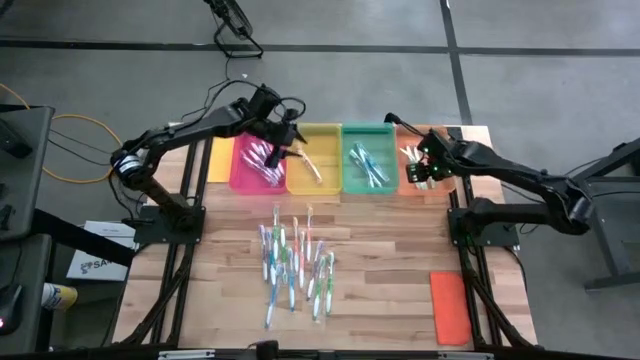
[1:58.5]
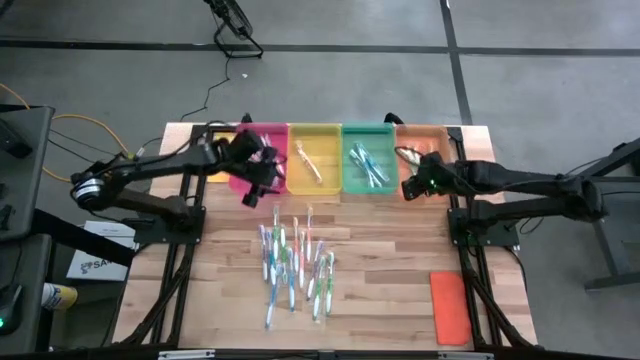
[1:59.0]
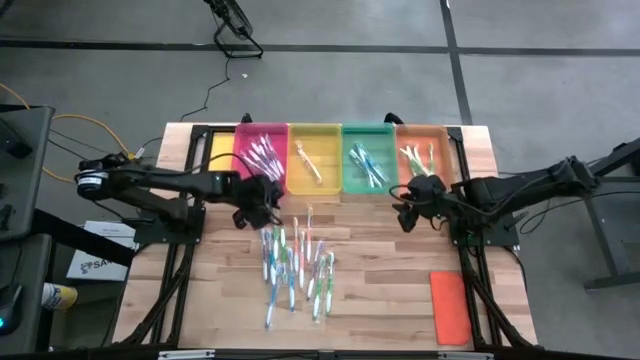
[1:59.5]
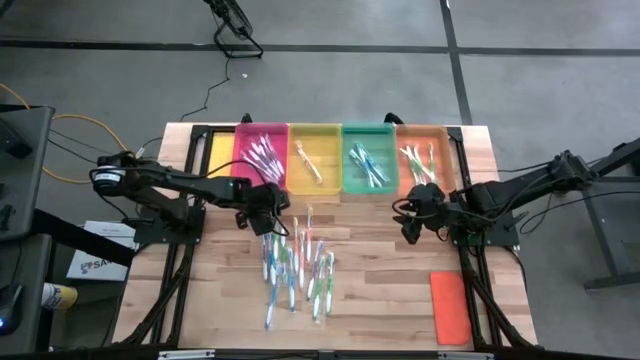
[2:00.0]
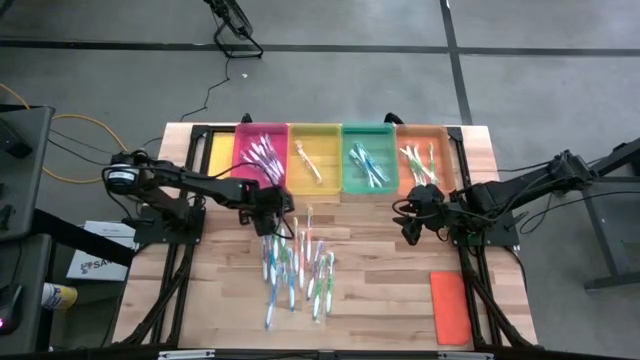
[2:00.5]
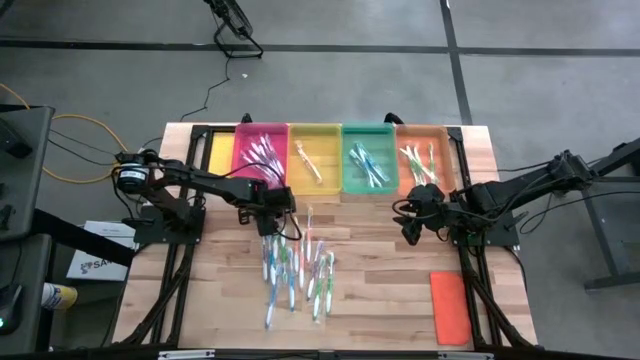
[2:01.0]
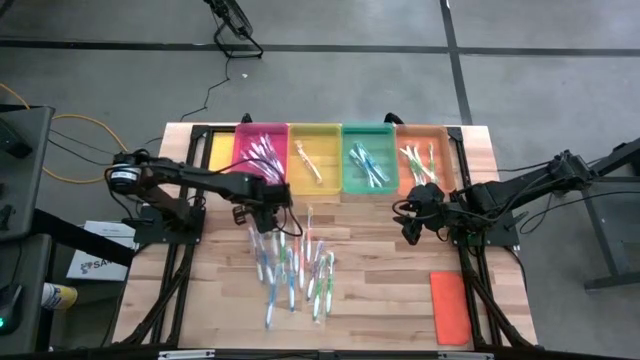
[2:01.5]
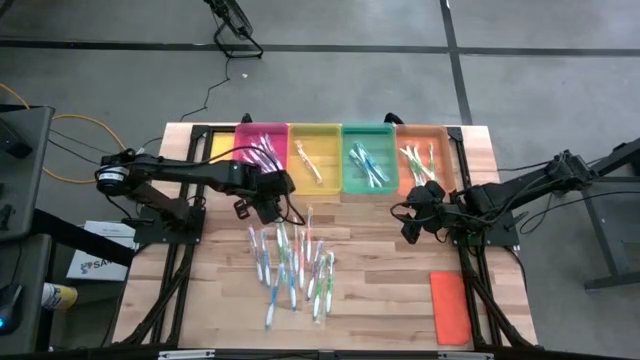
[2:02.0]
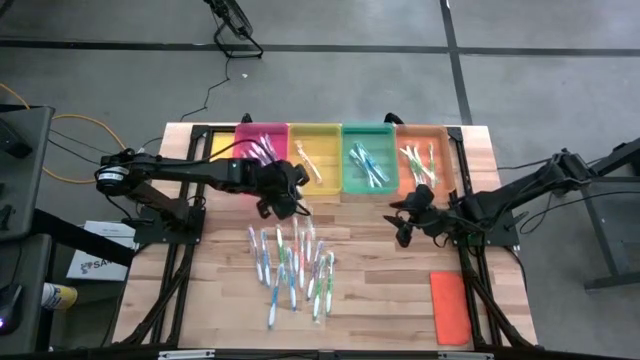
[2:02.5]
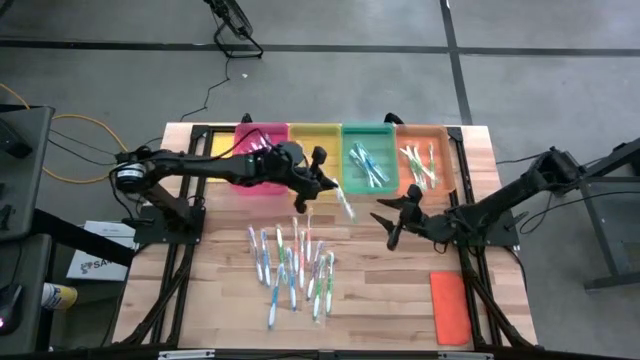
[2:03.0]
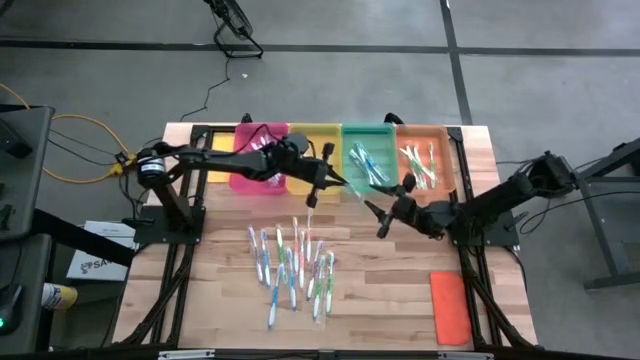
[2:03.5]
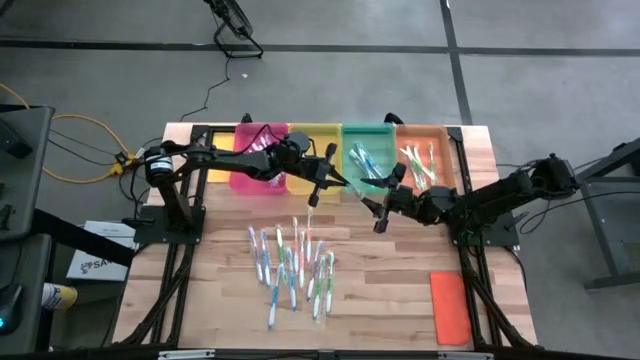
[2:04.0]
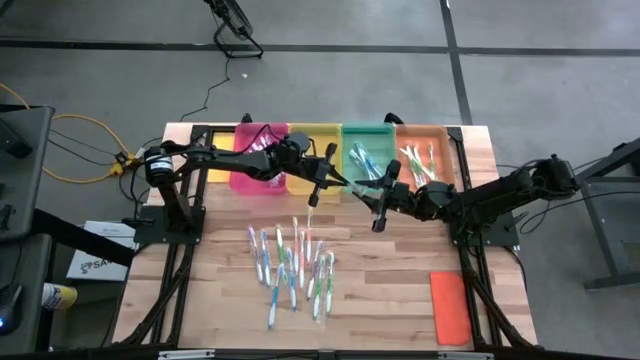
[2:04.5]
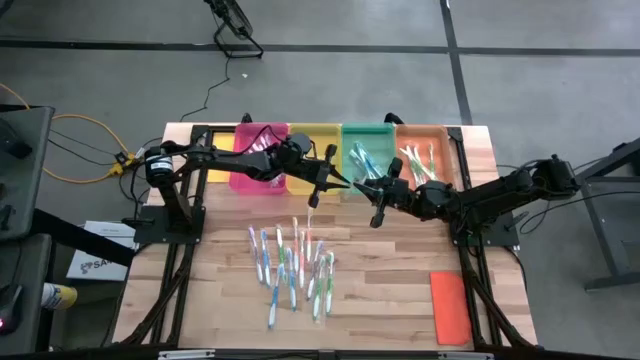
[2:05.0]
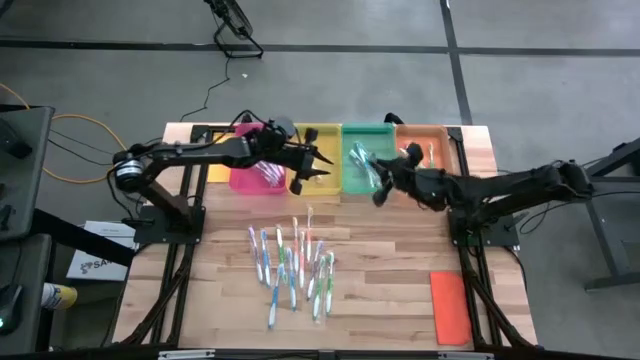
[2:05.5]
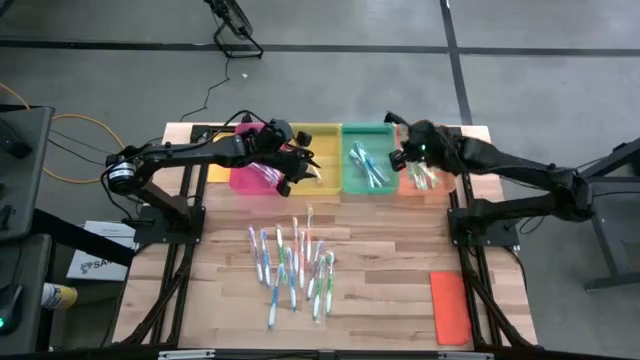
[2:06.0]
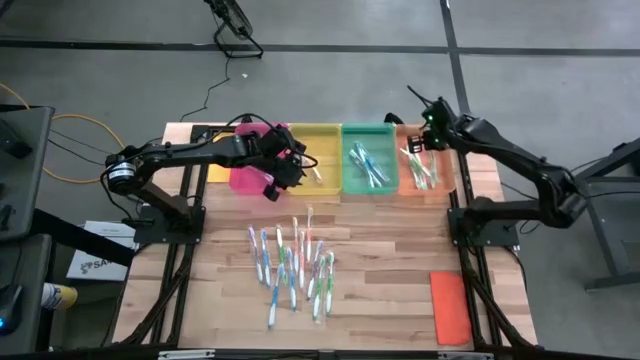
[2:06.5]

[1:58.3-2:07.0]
Task: Pick & Place Toothbrushes
Put the green toothbrush into the orange bin

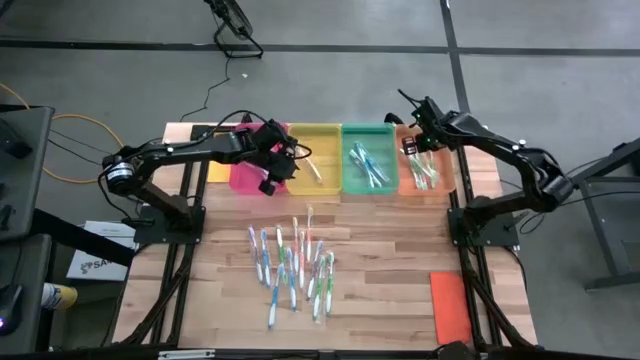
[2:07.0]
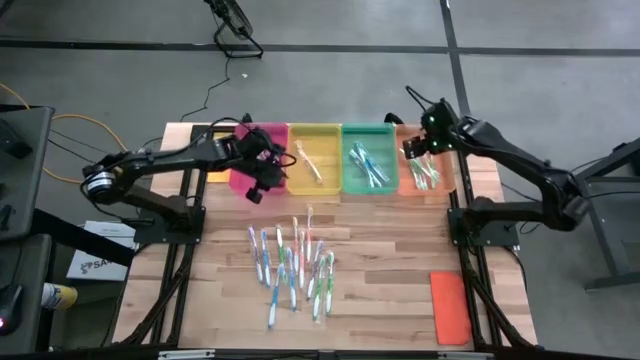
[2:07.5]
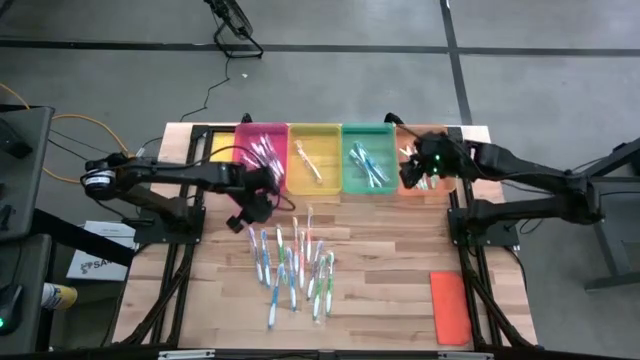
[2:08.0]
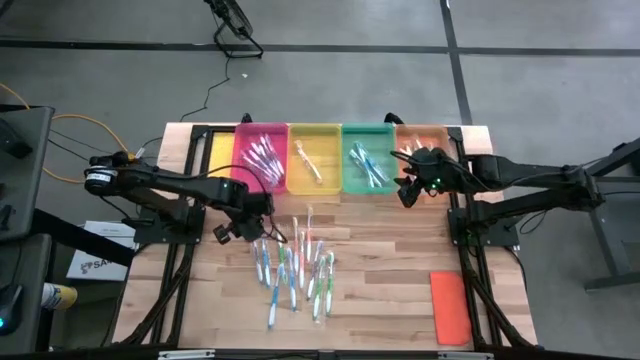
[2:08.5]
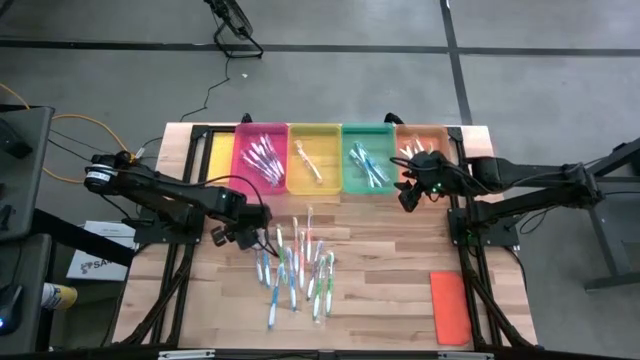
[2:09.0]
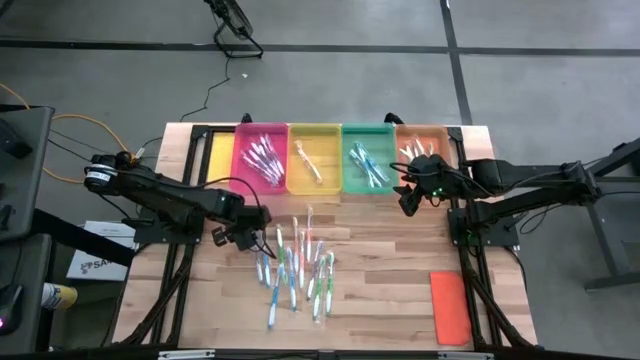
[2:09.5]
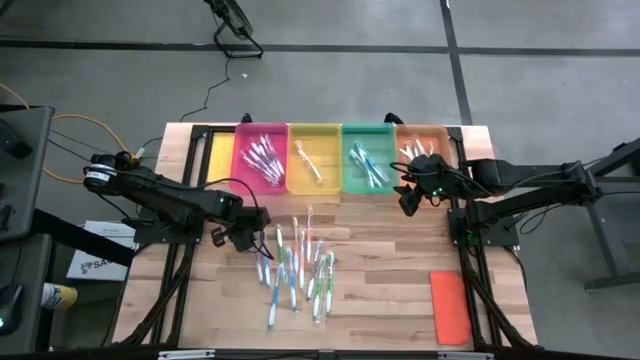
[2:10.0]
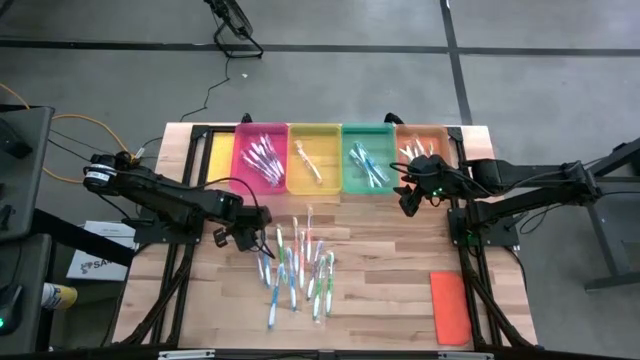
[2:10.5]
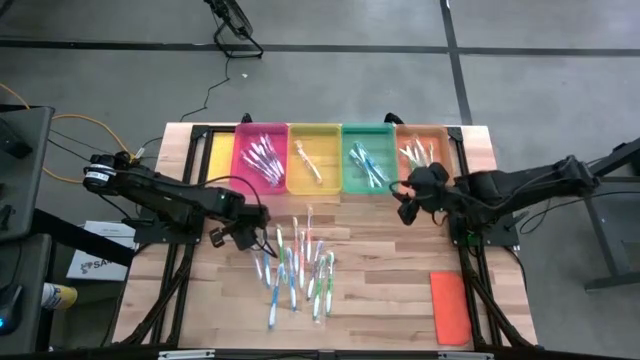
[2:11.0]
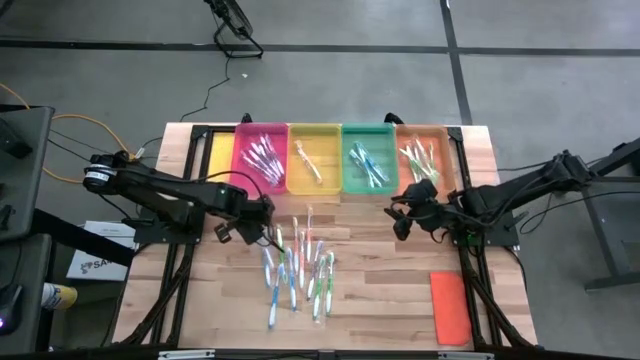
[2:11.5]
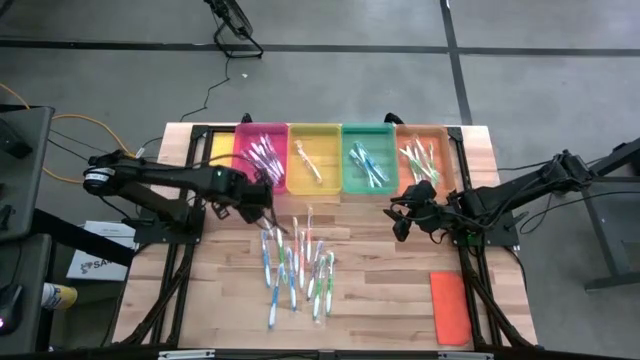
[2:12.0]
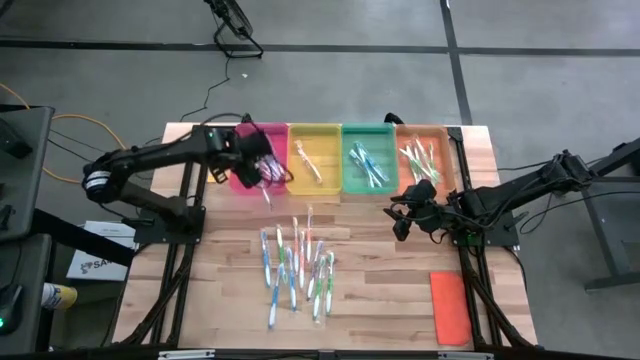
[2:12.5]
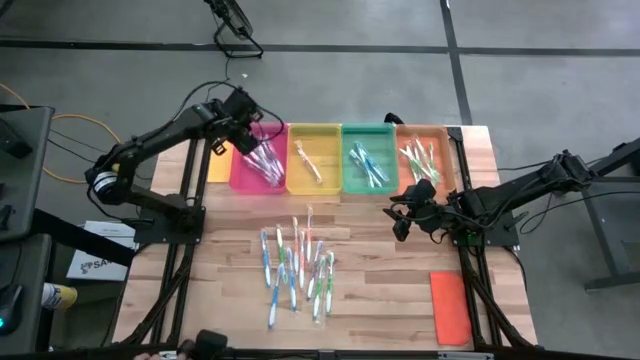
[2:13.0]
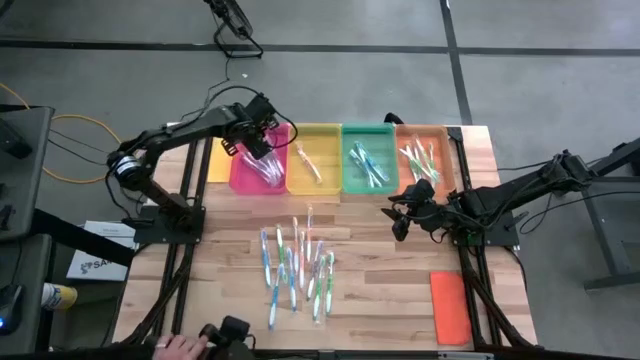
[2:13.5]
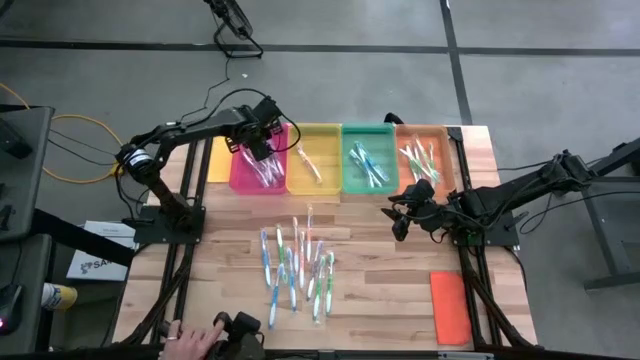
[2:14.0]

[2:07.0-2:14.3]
Put the purple toothbrush into the pink bin

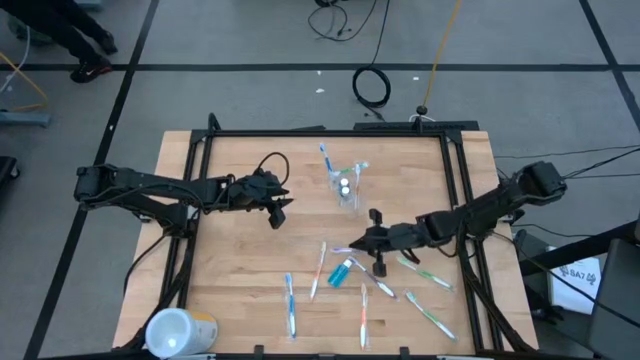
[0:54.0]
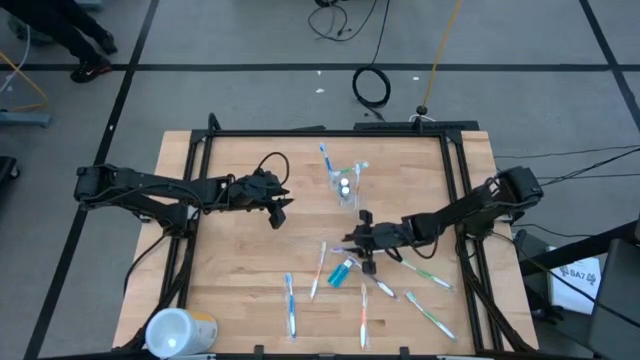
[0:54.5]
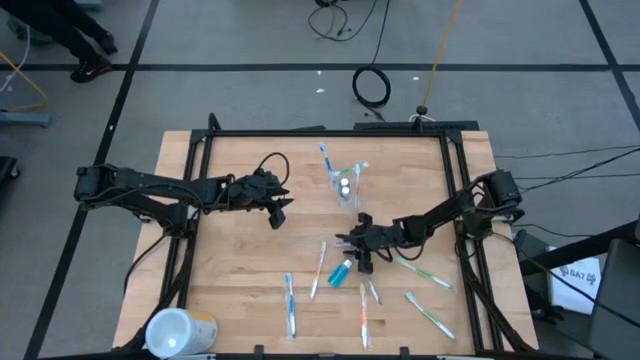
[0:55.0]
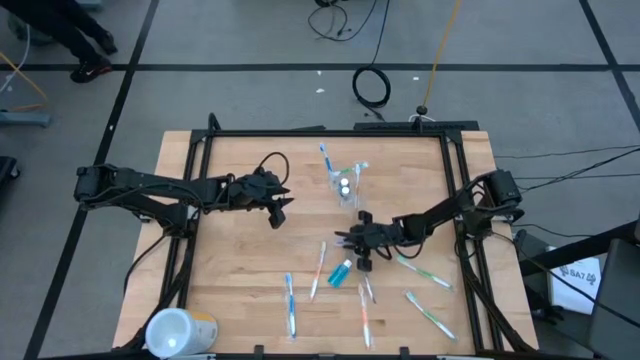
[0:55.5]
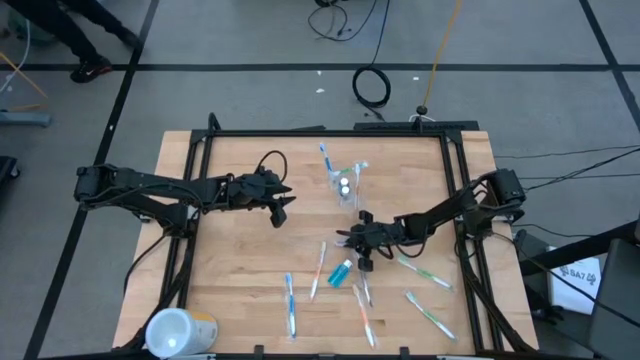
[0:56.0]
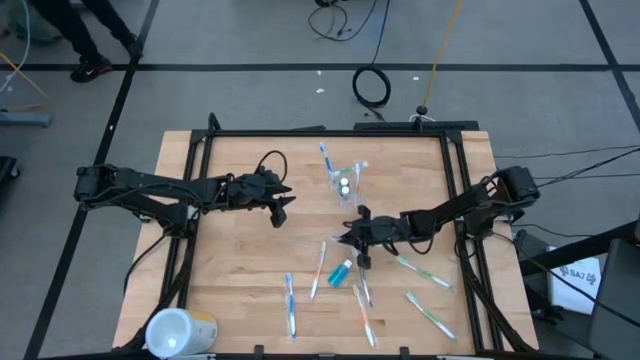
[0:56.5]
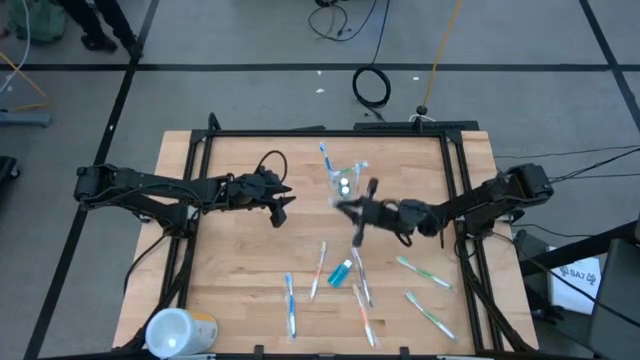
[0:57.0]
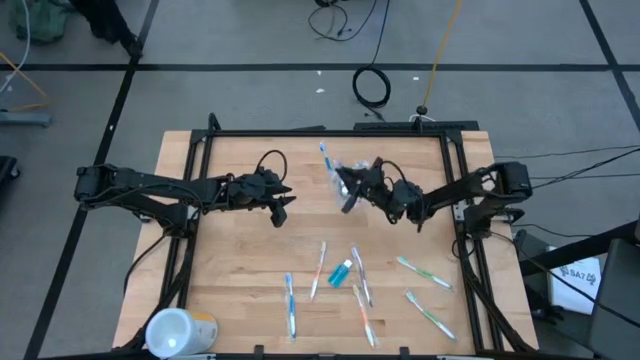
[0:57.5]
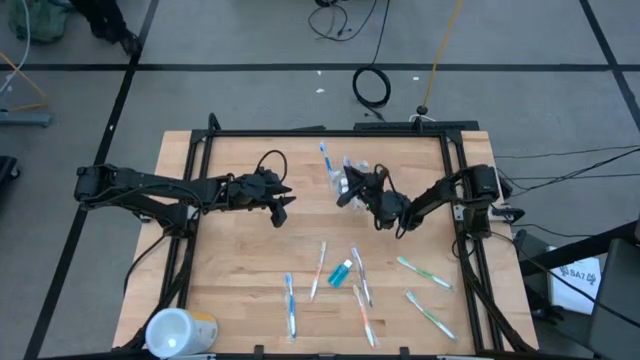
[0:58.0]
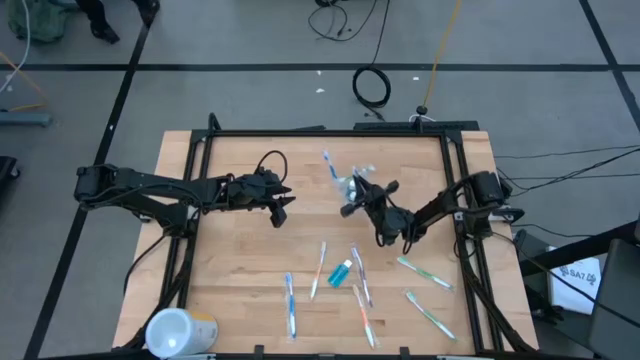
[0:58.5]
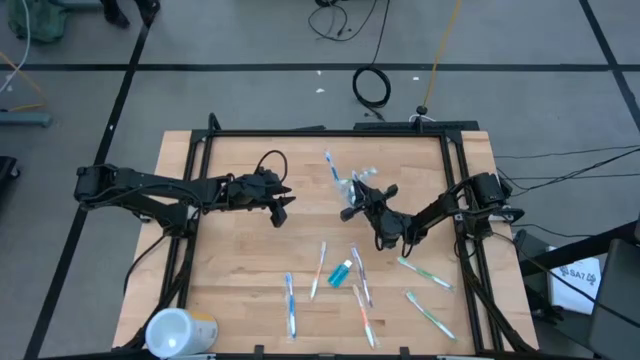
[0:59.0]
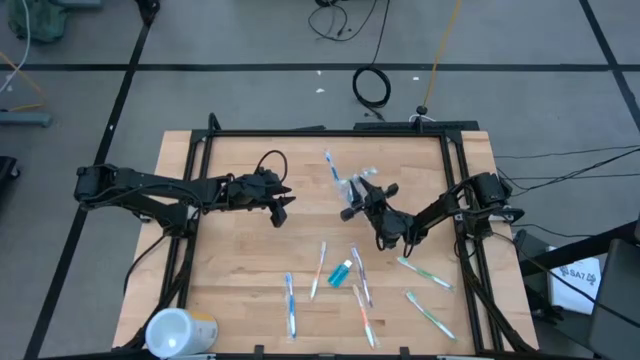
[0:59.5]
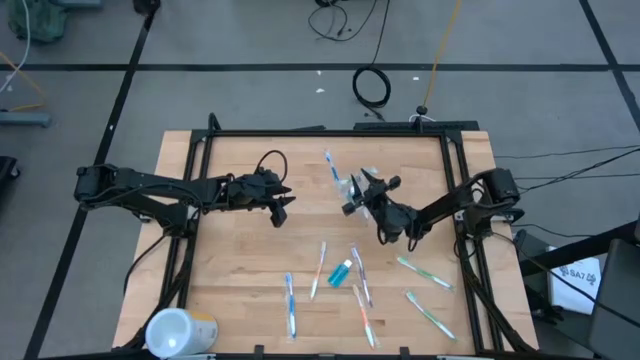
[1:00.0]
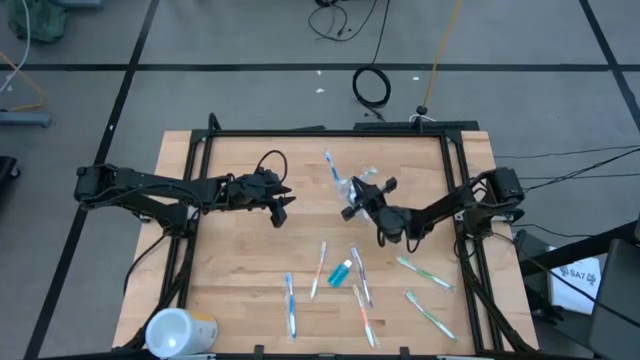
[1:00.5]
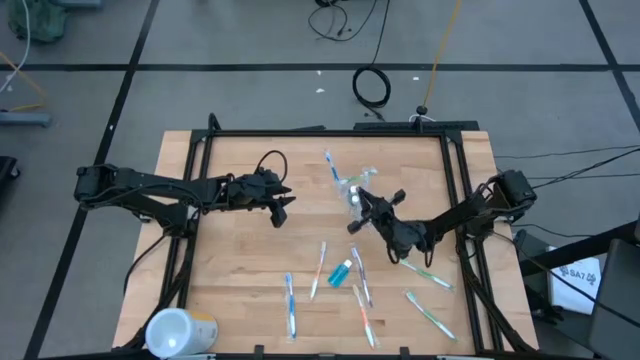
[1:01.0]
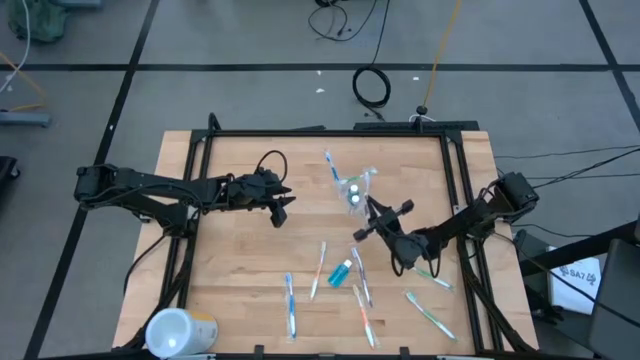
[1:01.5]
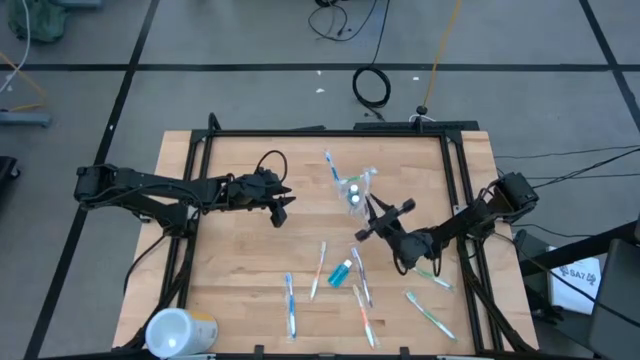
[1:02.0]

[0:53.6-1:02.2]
Task: Pick & Place toothbrushing station
Put the top violet toothbrush into the transparent organizer
